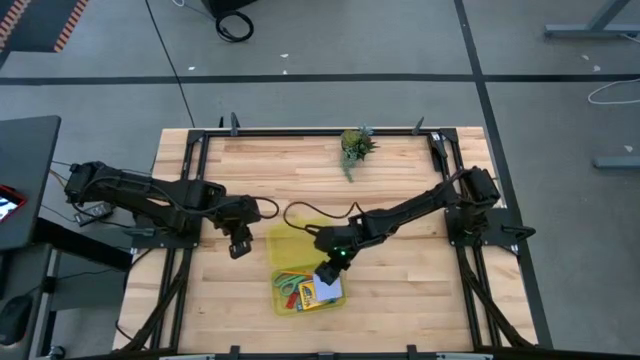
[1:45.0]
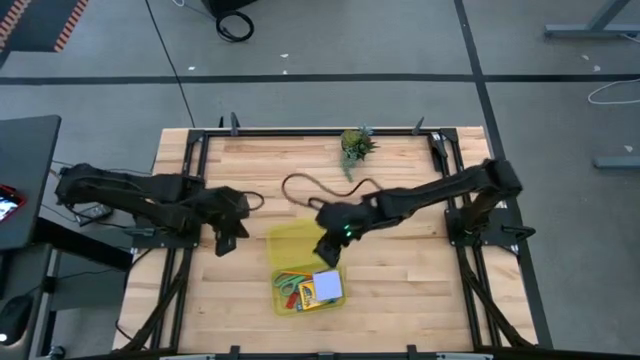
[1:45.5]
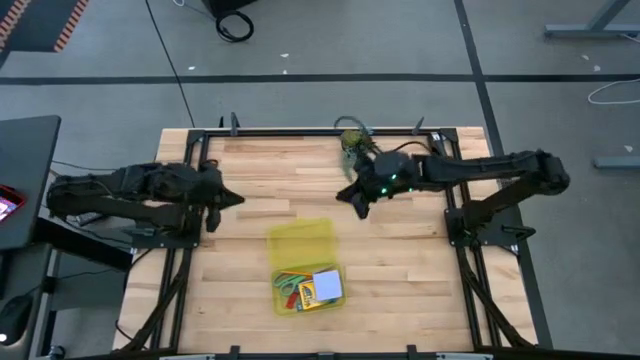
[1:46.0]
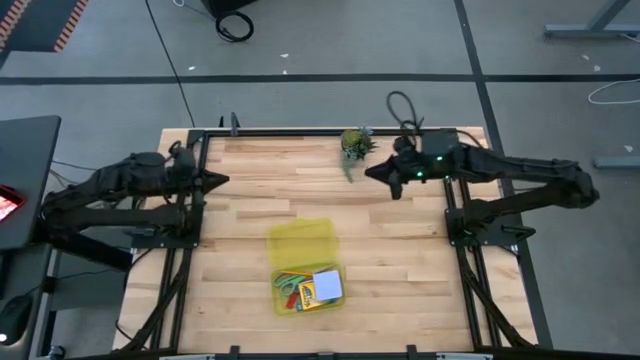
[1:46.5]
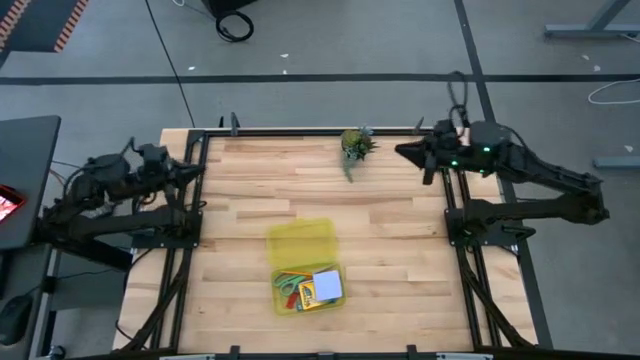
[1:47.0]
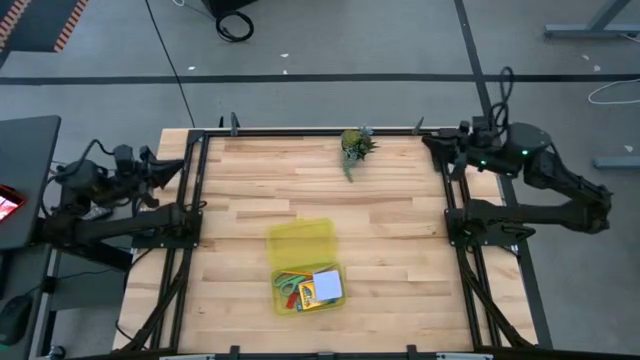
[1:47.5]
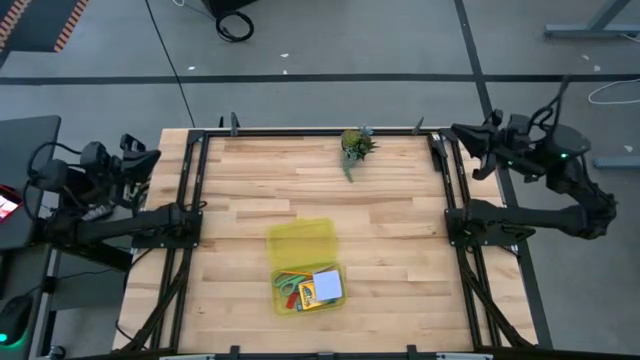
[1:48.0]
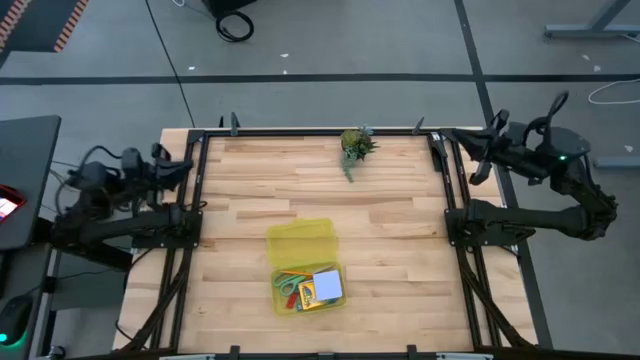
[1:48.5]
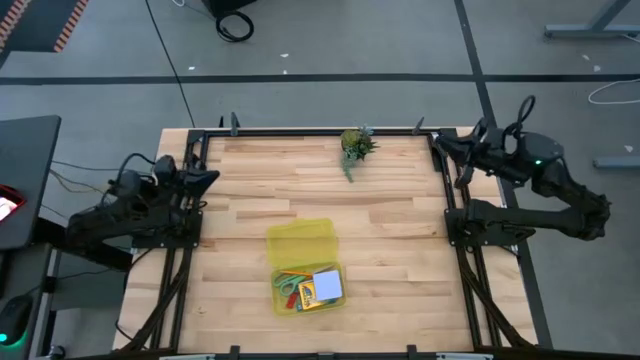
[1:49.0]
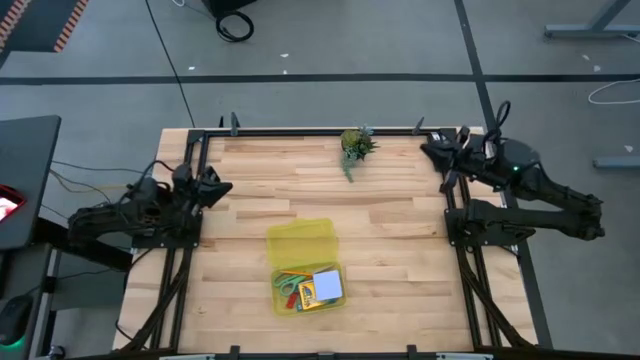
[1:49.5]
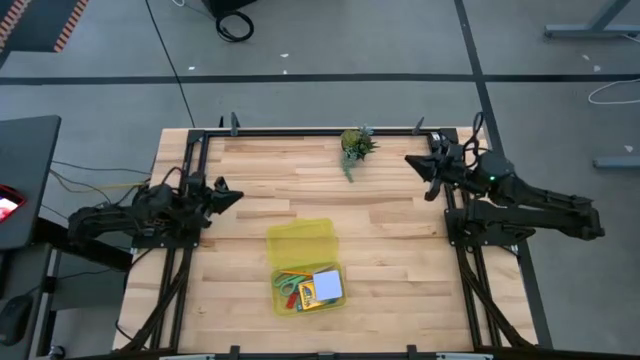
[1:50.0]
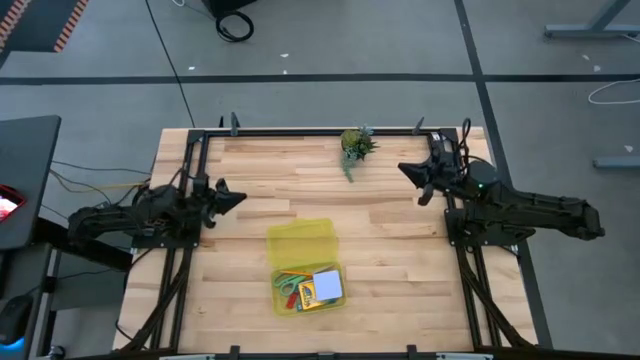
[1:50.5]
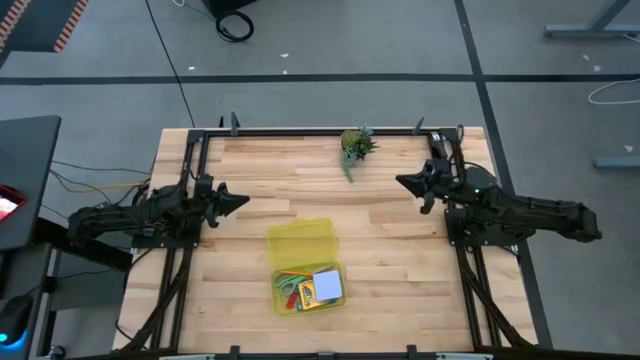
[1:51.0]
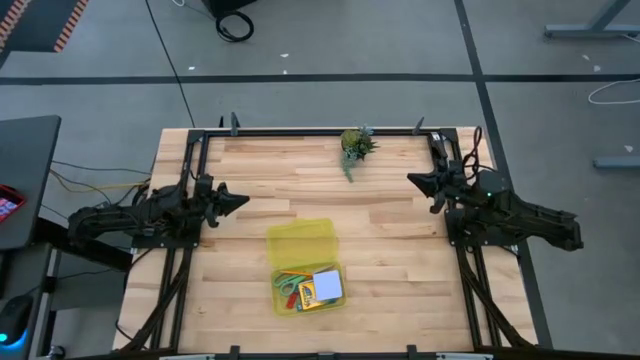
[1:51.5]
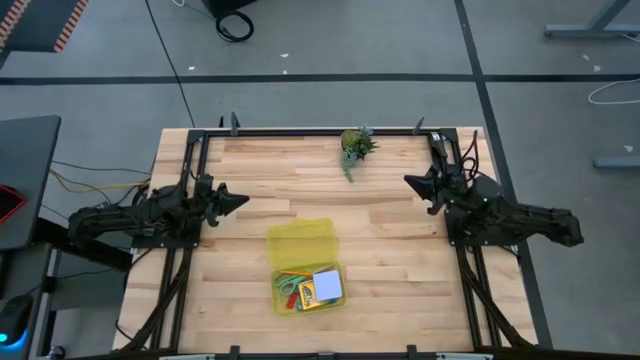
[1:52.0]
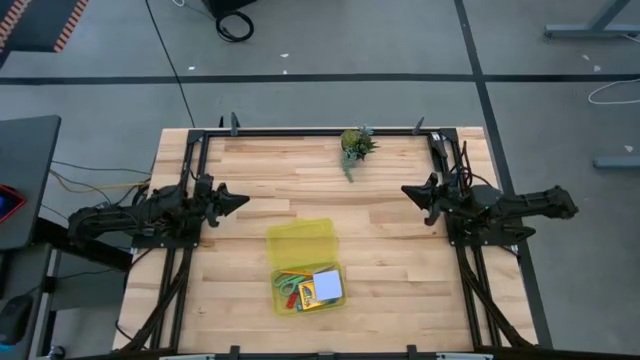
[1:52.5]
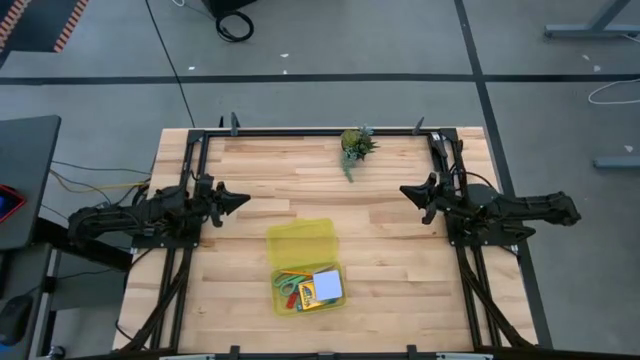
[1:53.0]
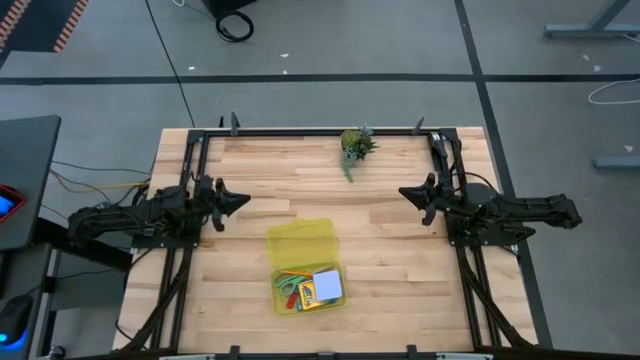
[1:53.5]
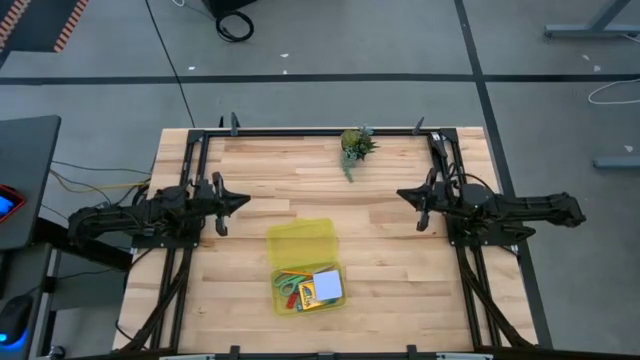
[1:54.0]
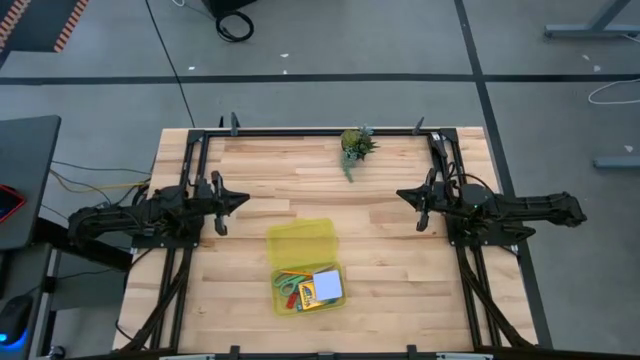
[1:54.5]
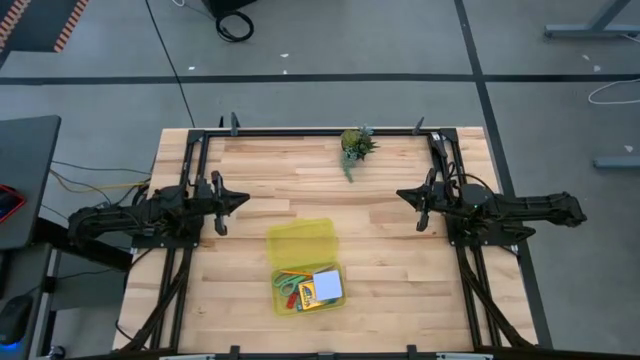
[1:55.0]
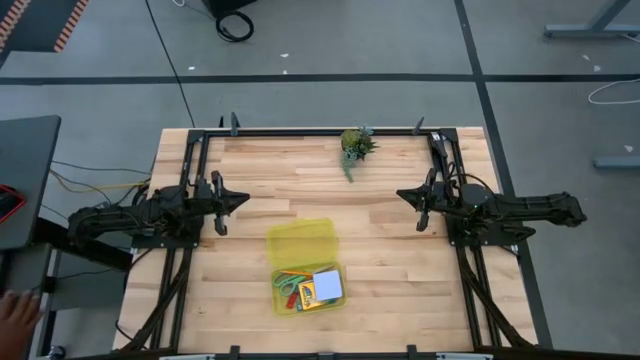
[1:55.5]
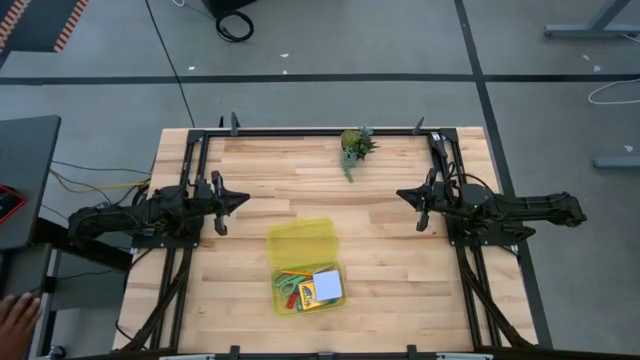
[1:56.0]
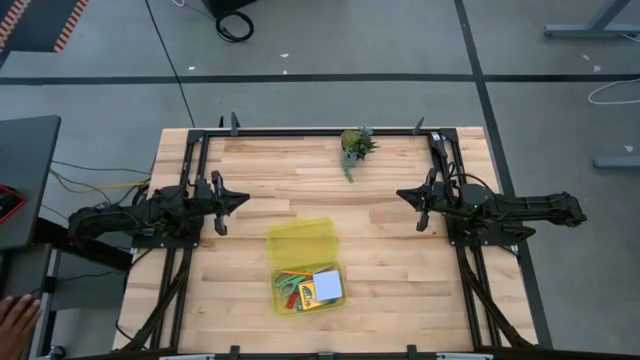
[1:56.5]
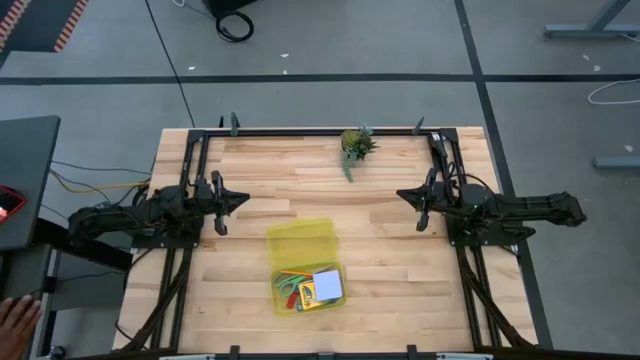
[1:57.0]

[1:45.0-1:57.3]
Task: Pack school essentials
Return to Home Position

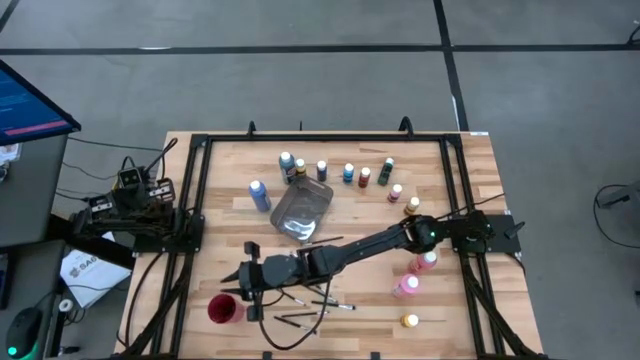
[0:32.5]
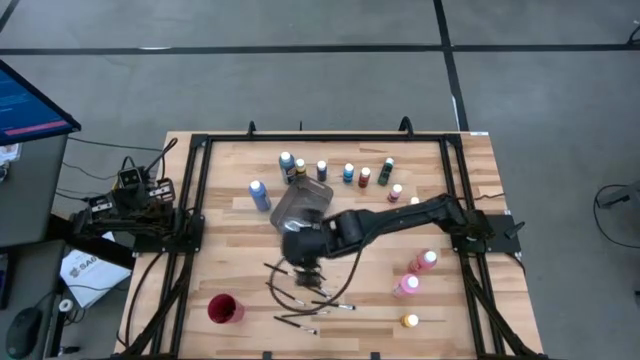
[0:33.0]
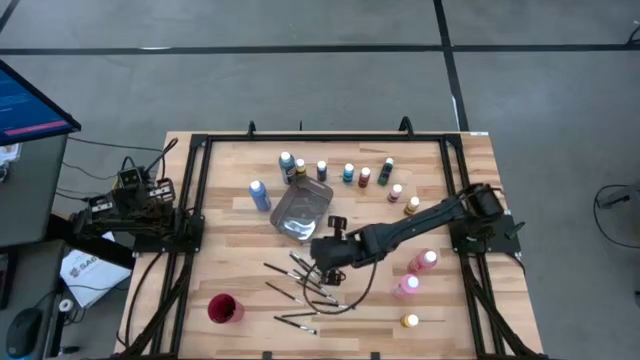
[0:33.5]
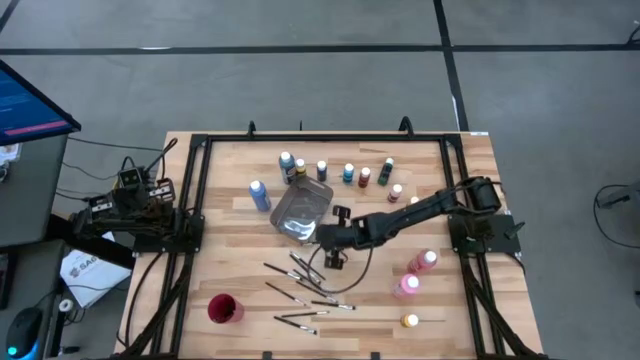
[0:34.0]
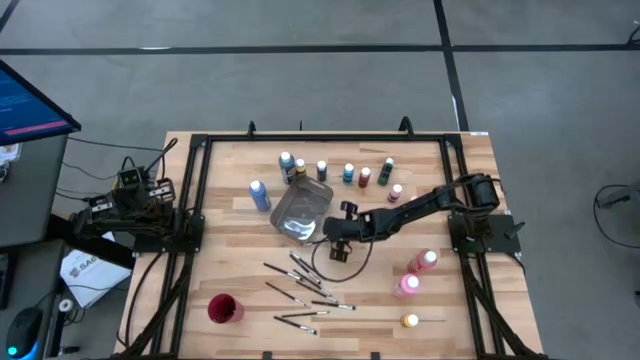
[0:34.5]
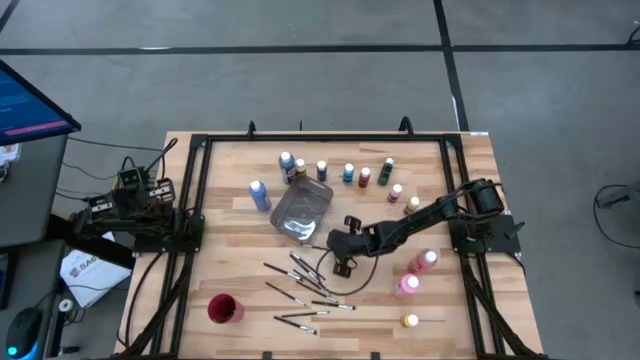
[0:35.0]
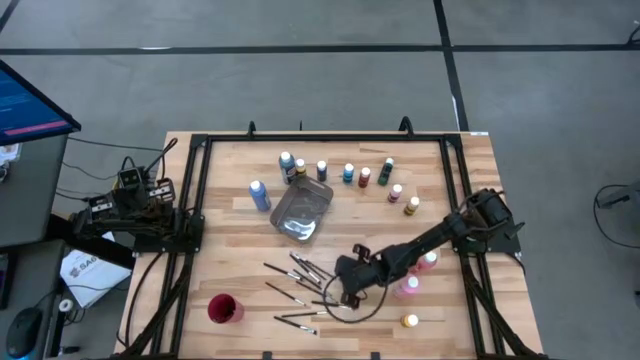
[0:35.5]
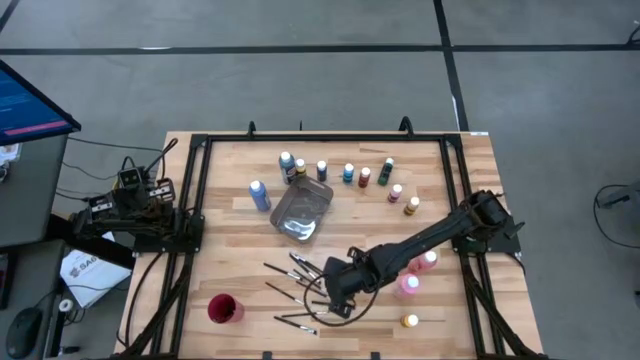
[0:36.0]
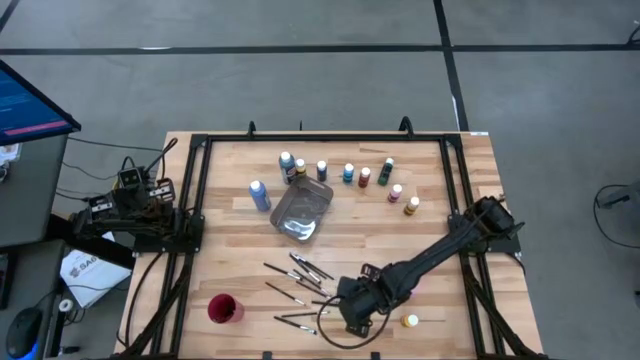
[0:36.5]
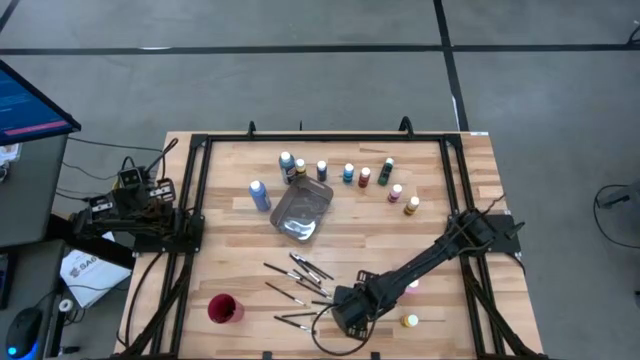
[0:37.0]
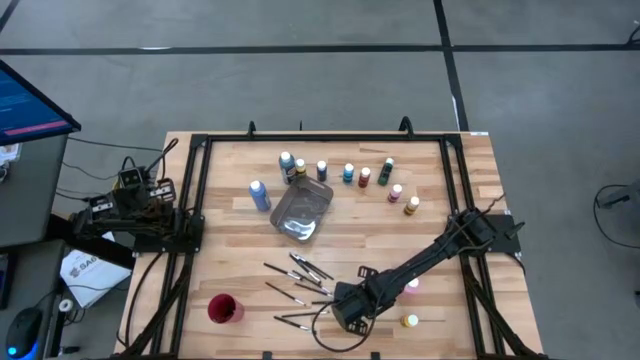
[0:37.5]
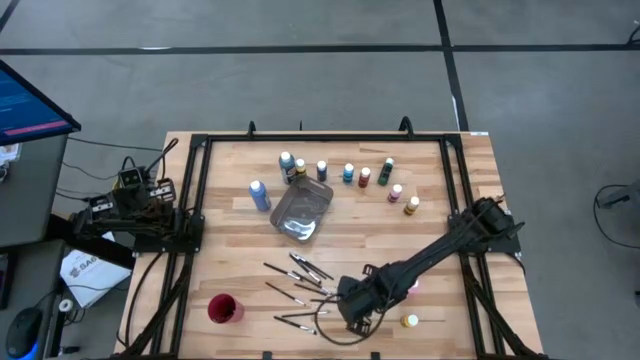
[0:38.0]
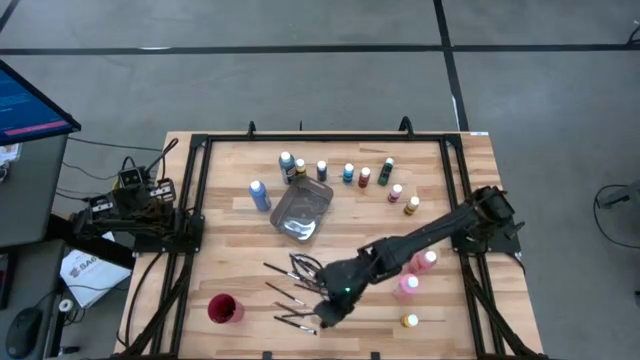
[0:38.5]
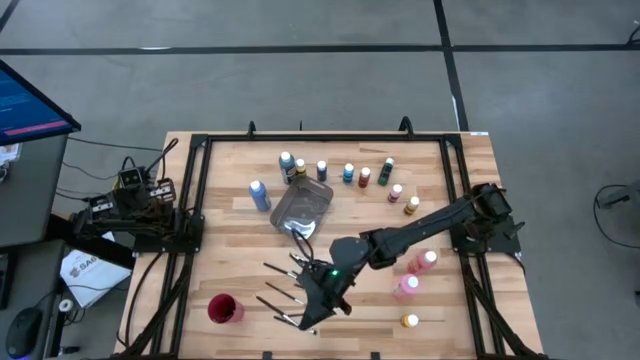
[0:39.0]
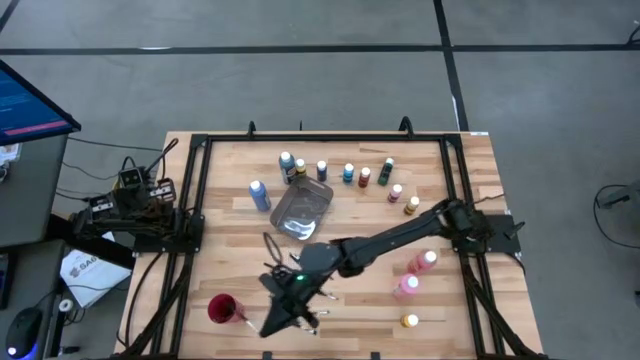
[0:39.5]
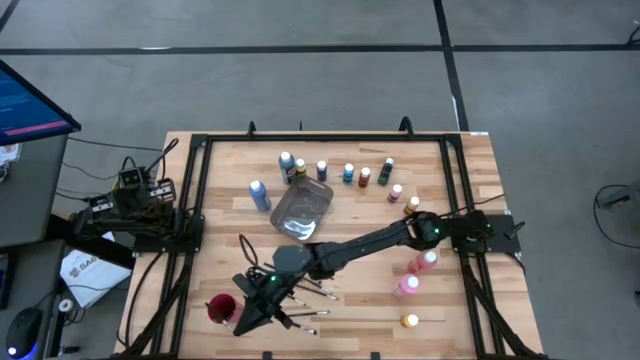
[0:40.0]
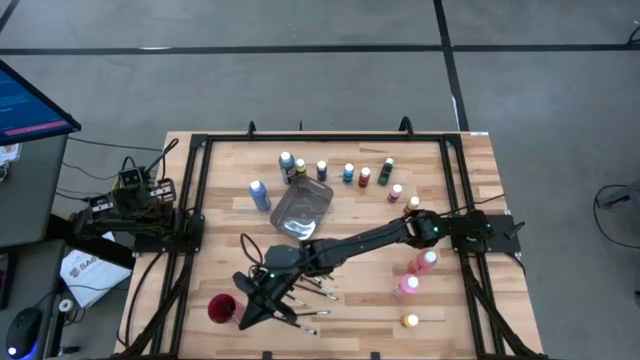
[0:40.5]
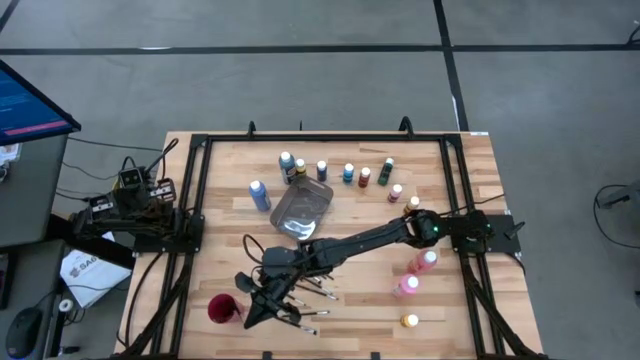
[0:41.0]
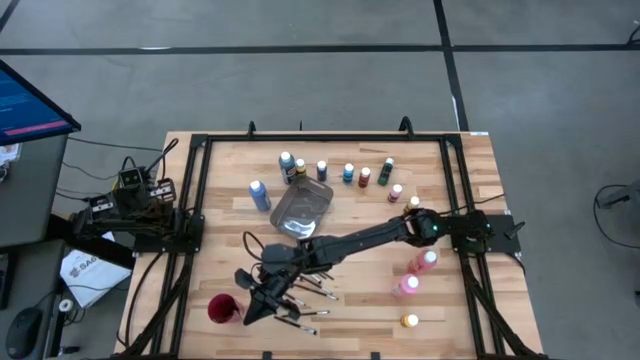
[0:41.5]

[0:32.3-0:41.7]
Task: Pick & Place Paint Supplies
Put the silver paintbrush into the red cup
